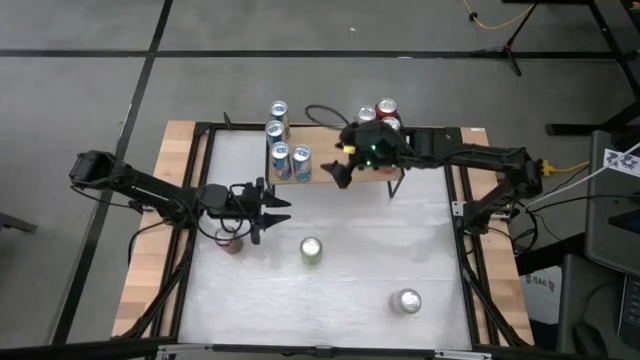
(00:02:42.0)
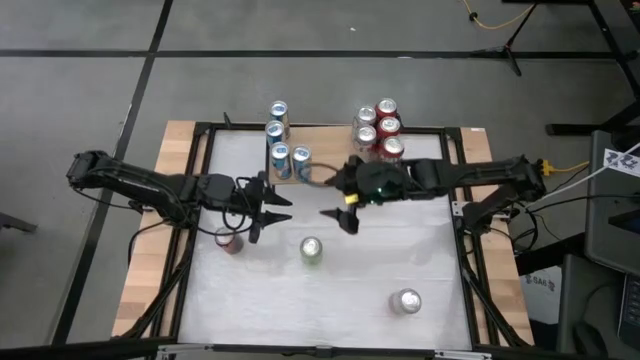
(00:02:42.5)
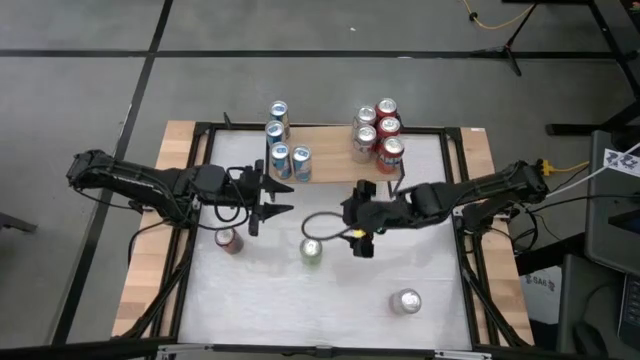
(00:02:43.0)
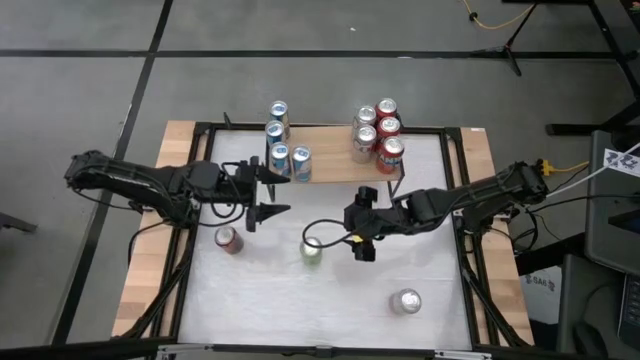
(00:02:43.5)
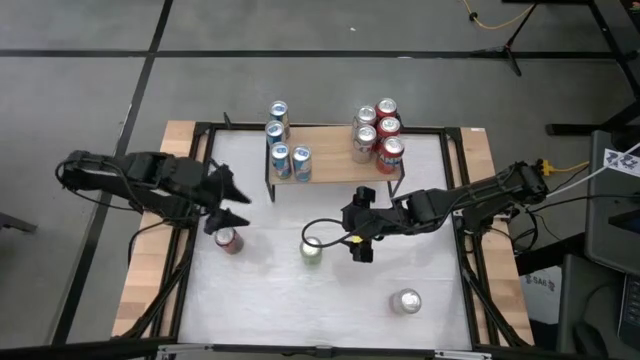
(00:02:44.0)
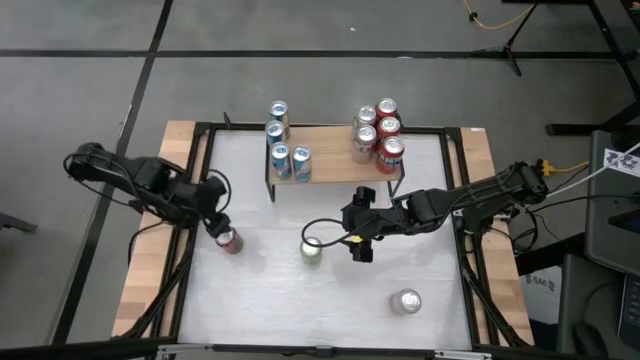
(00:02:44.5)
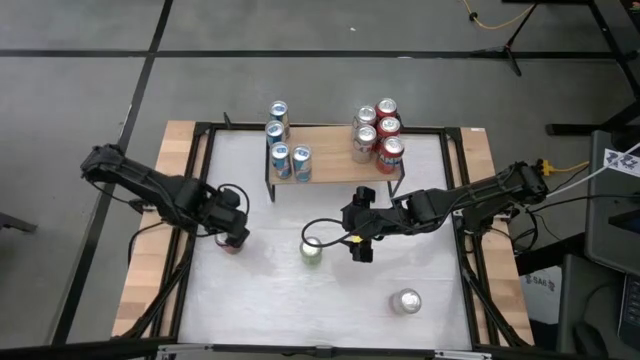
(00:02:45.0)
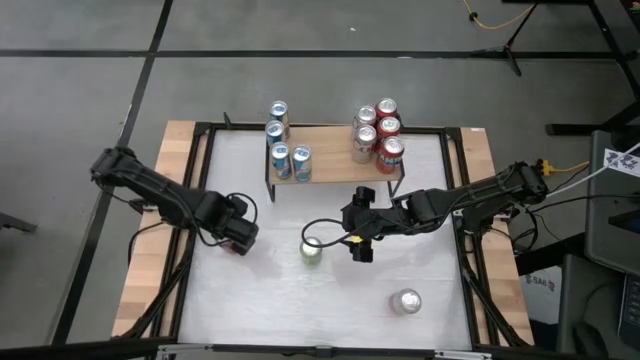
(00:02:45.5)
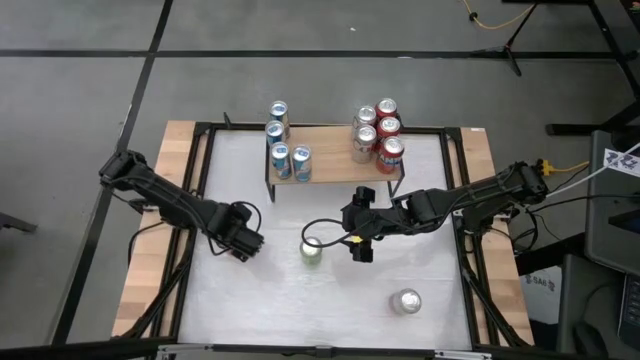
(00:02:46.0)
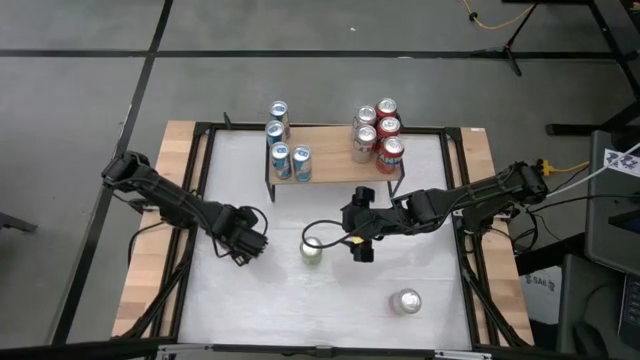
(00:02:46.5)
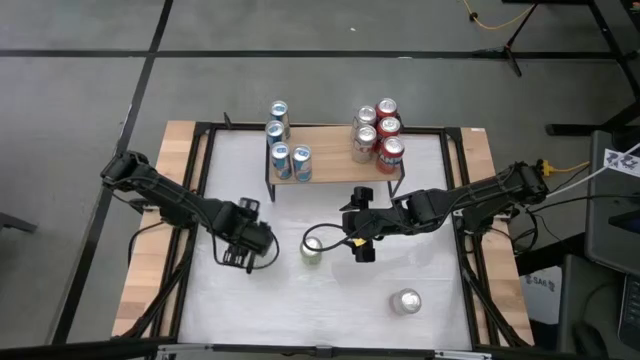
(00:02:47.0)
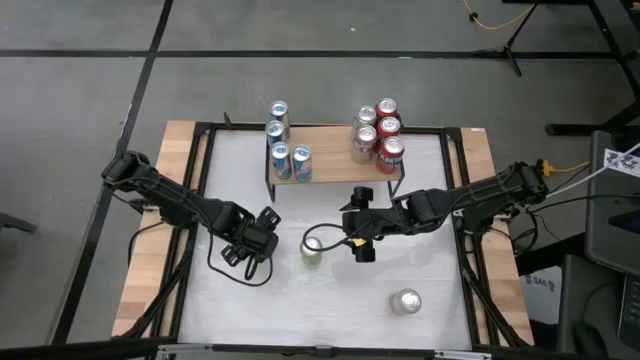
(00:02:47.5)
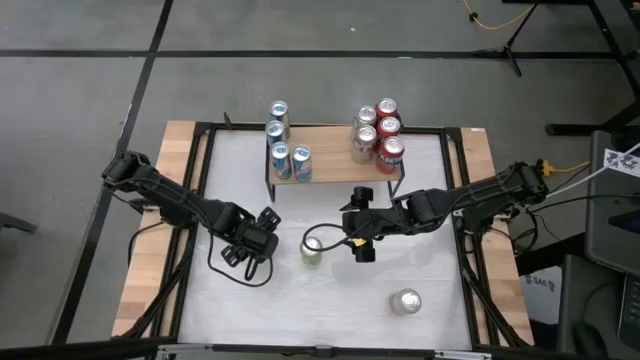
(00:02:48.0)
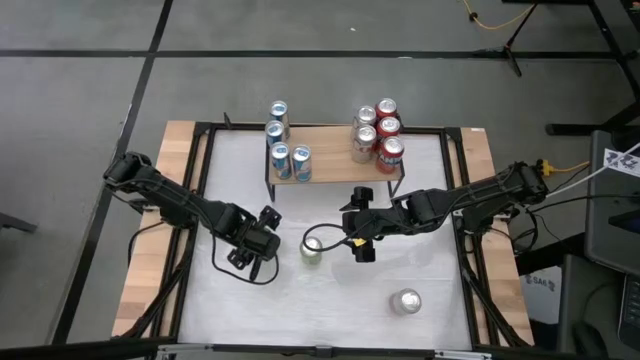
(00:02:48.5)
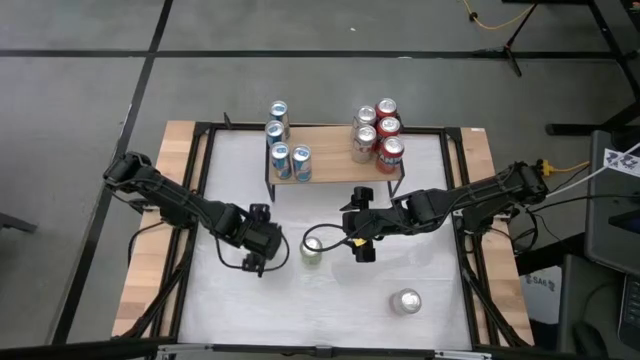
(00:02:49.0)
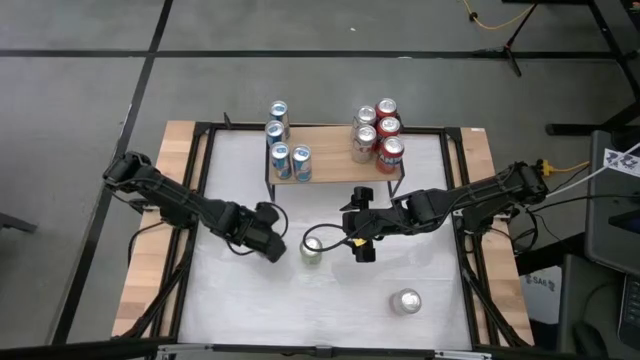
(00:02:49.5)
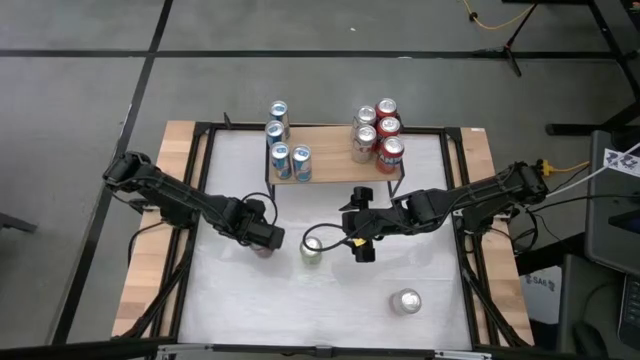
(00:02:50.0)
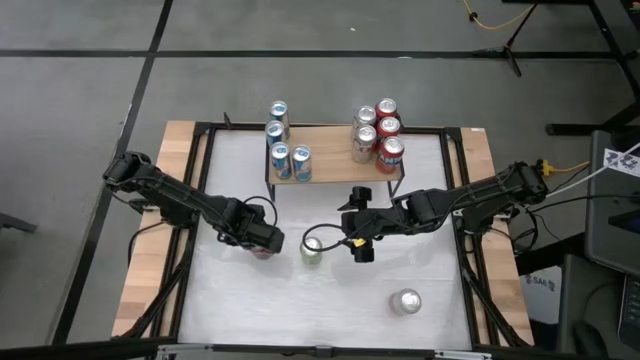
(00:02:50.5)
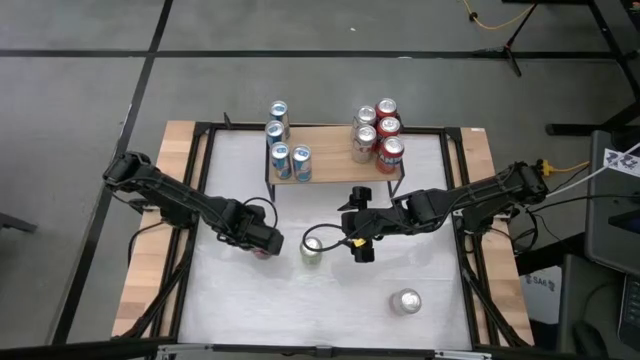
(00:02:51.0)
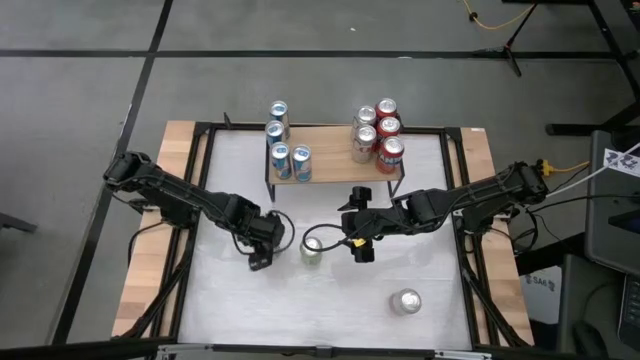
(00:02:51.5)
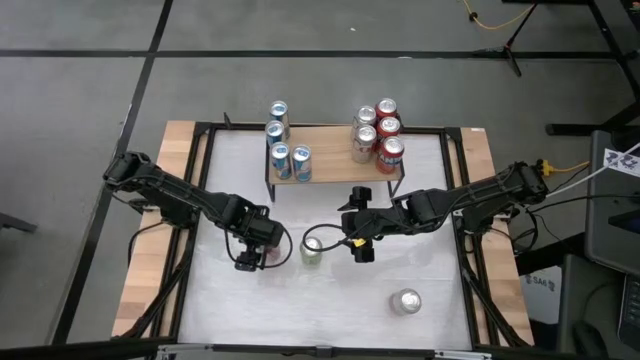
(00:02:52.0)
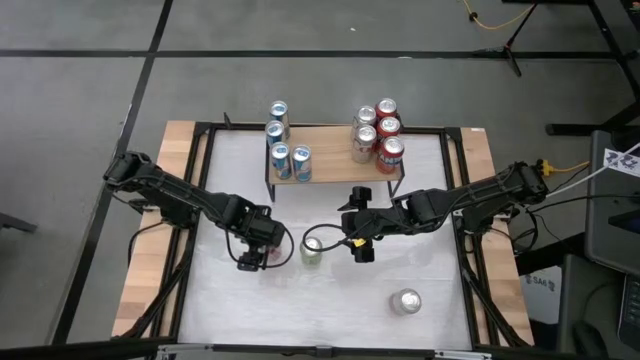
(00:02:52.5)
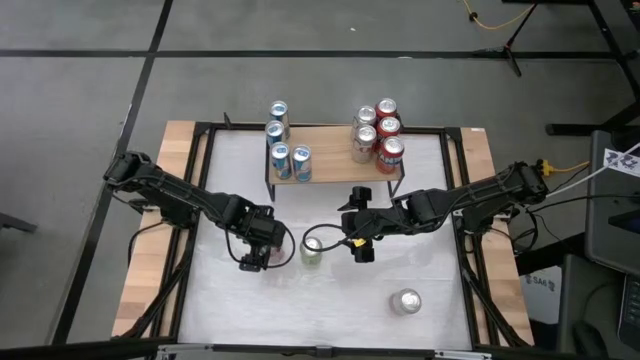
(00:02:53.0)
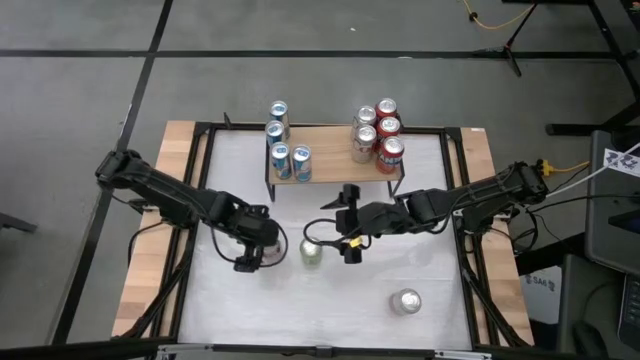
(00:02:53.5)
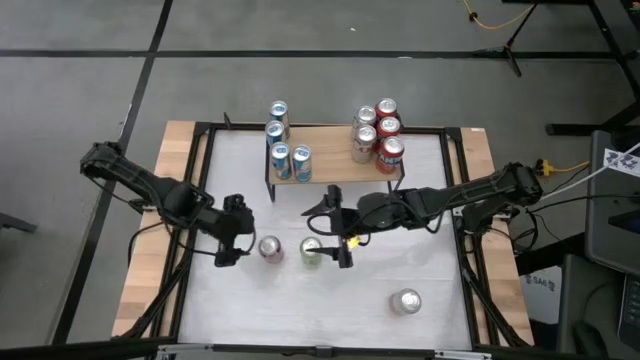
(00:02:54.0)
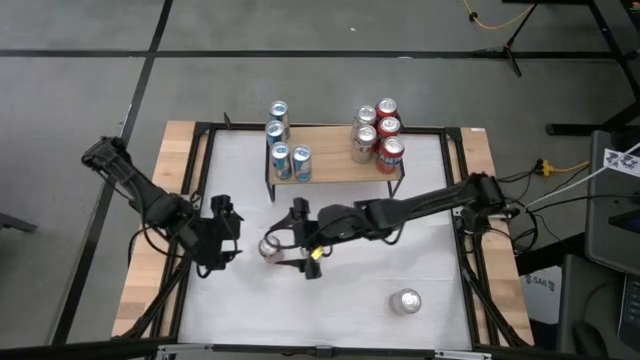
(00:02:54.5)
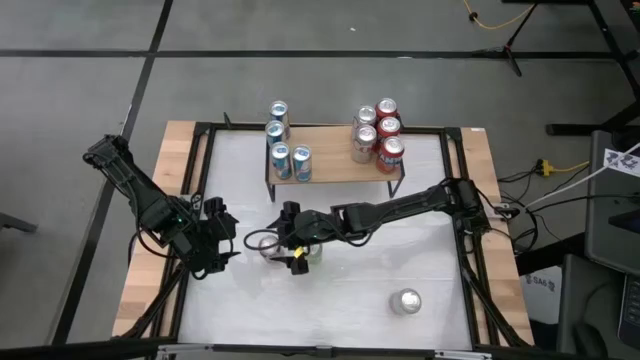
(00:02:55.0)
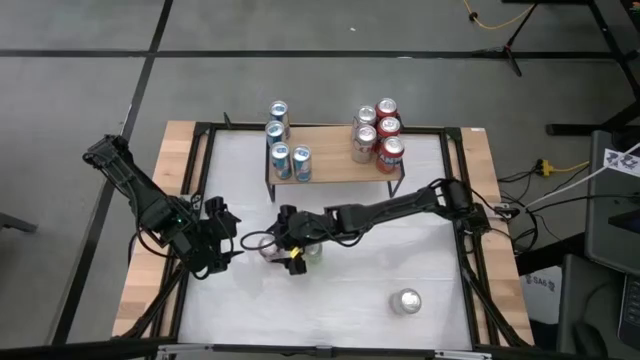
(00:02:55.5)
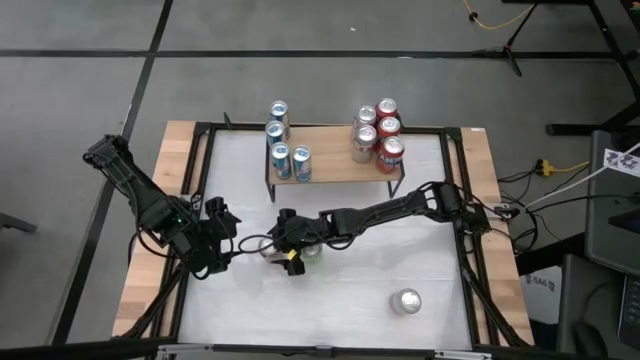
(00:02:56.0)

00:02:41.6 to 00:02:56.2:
Task: Sort soda cans
Put the red-white soda can on the shelf aligned with the red-silver soda cans

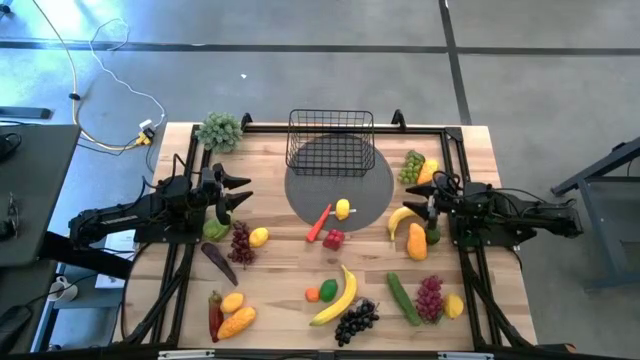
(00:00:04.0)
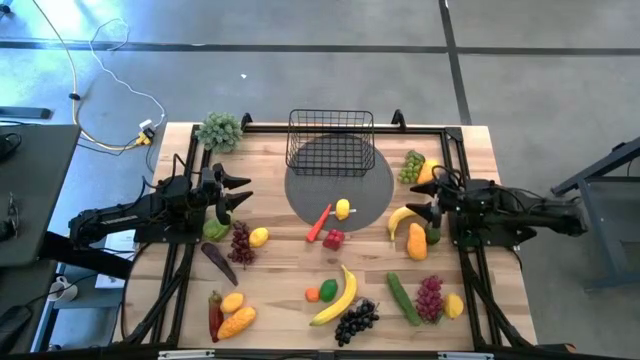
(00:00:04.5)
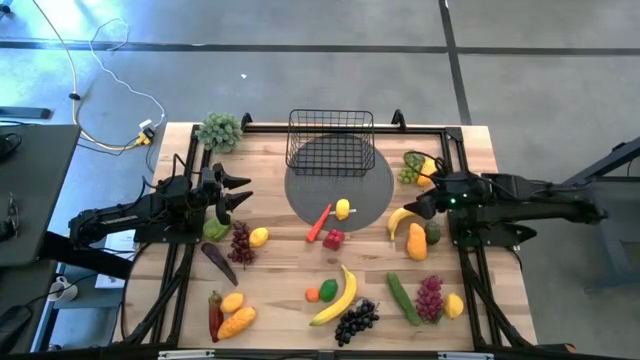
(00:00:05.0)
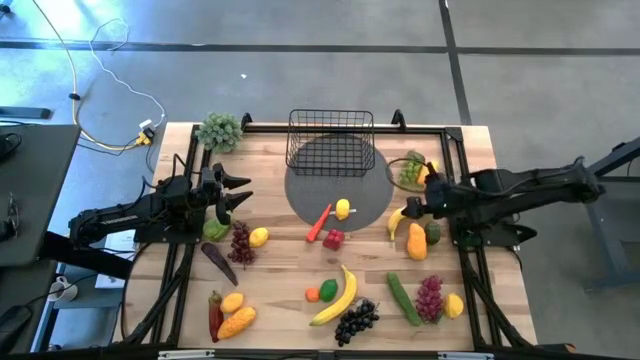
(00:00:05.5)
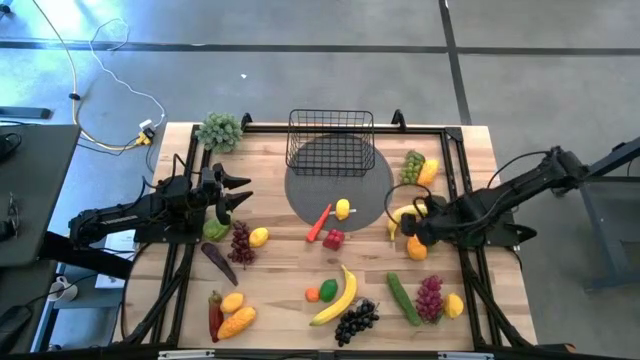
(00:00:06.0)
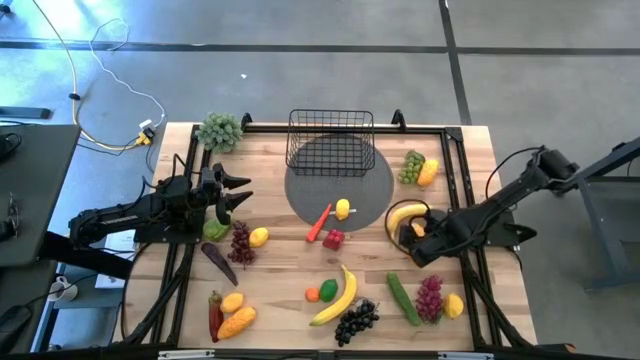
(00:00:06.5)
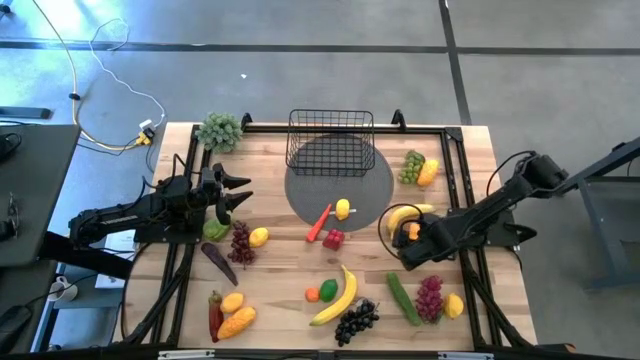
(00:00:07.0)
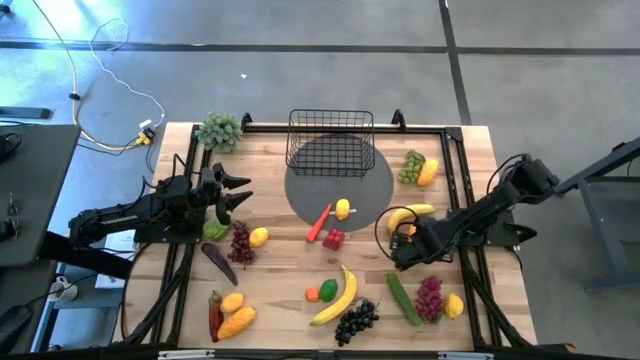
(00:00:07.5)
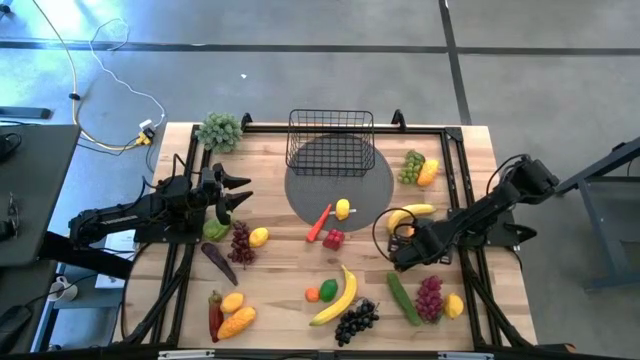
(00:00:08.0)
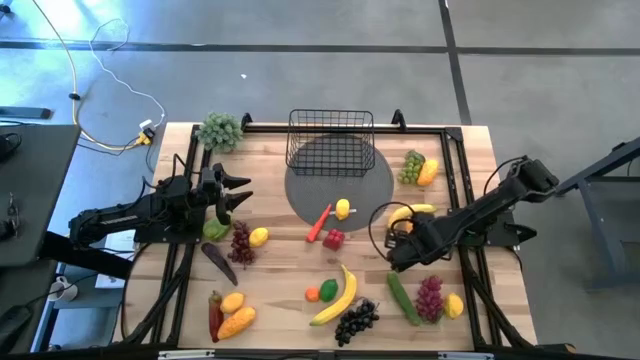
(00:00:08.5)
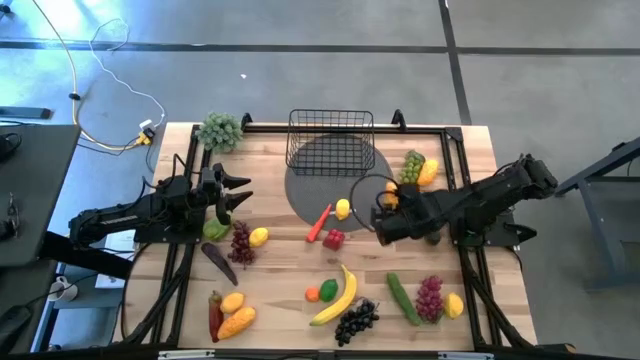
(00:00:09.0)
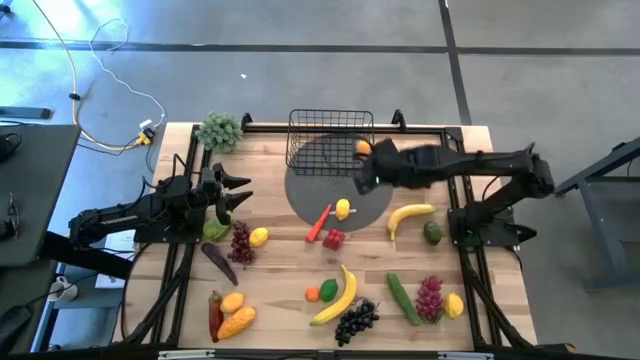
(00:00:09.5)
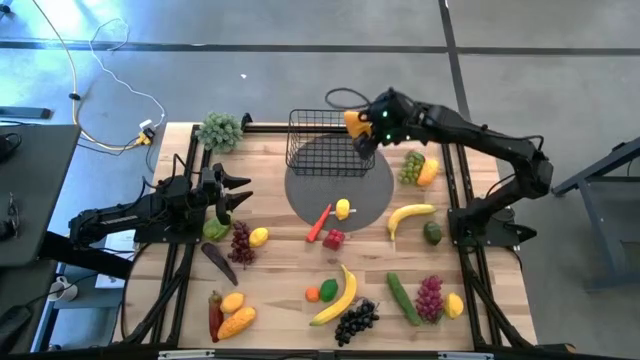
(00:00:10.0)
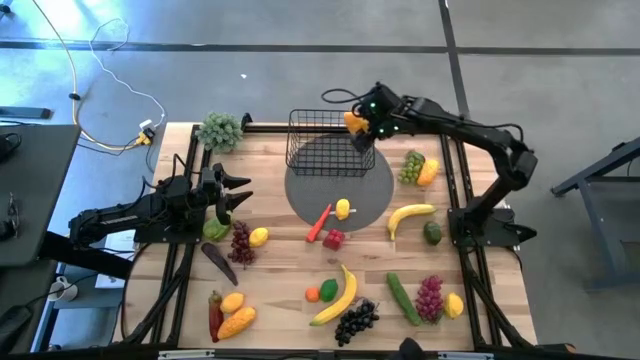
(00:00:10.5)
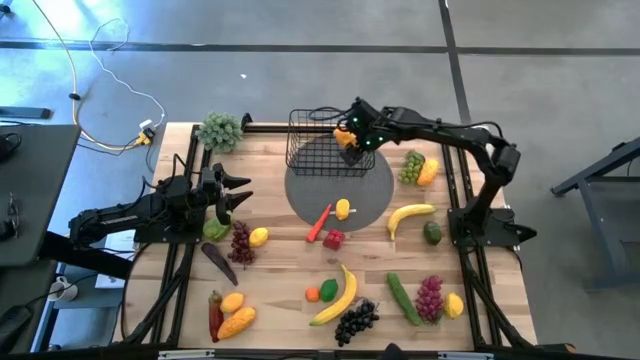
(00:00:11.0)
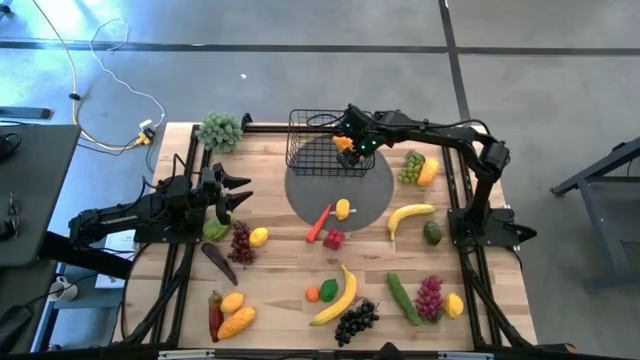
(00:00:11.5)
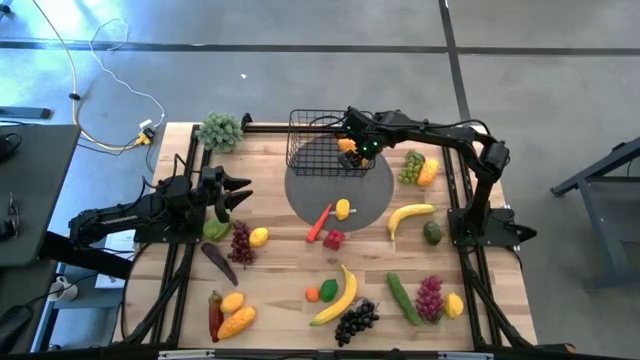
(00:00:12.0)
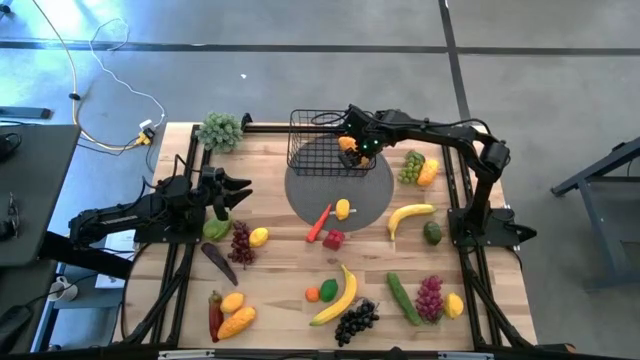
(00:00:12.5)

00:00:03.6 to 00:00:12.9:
Task: Build produce basket
Put the mango into the wire basket
